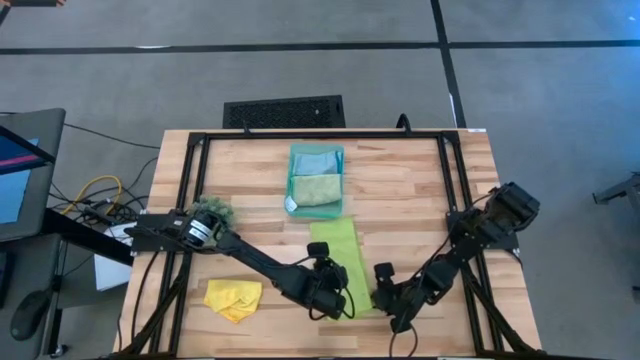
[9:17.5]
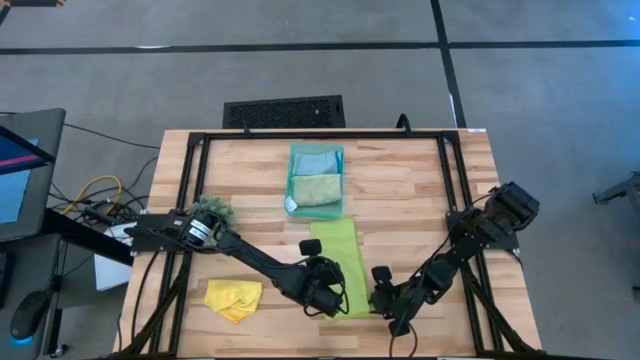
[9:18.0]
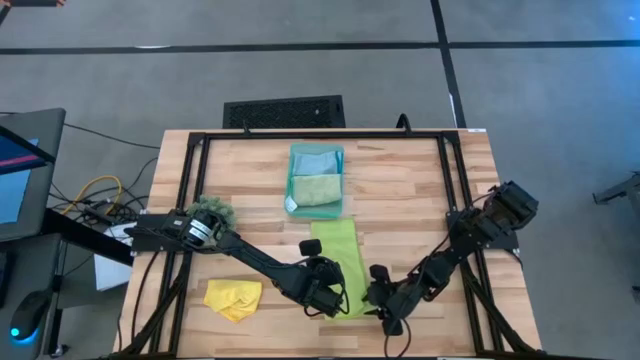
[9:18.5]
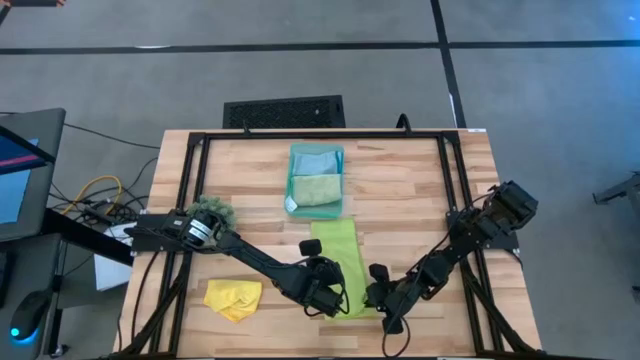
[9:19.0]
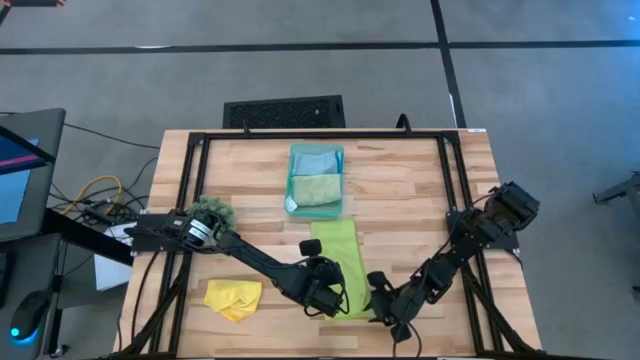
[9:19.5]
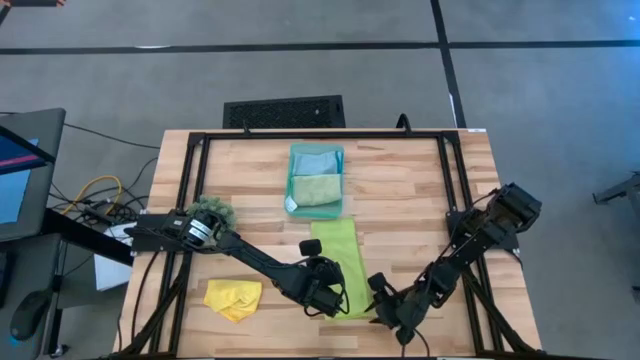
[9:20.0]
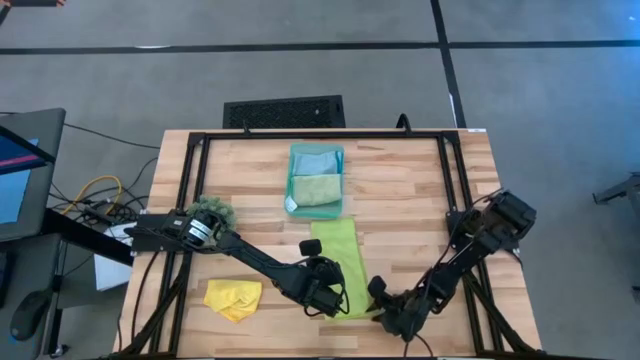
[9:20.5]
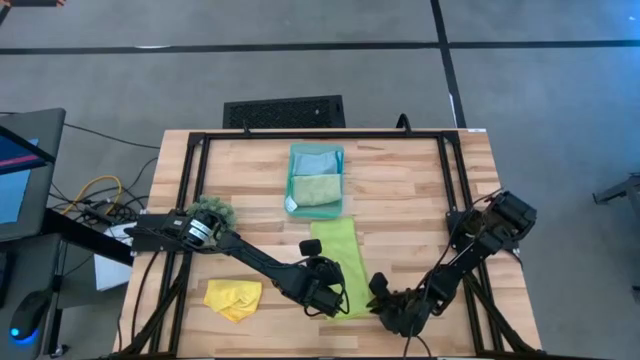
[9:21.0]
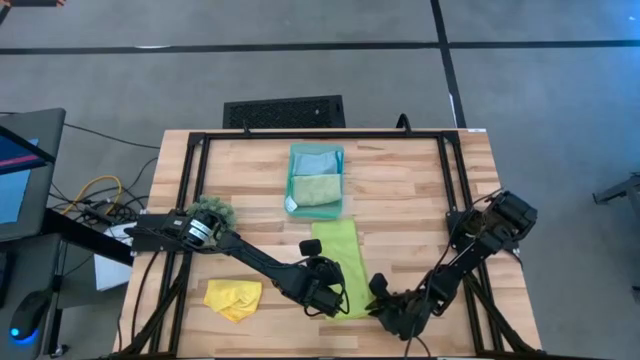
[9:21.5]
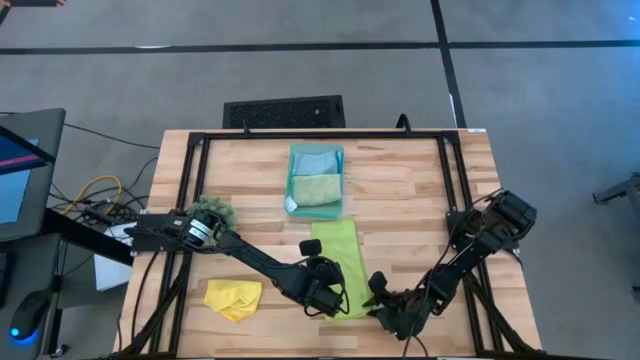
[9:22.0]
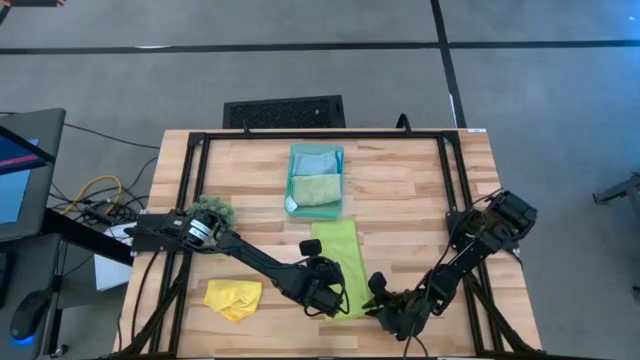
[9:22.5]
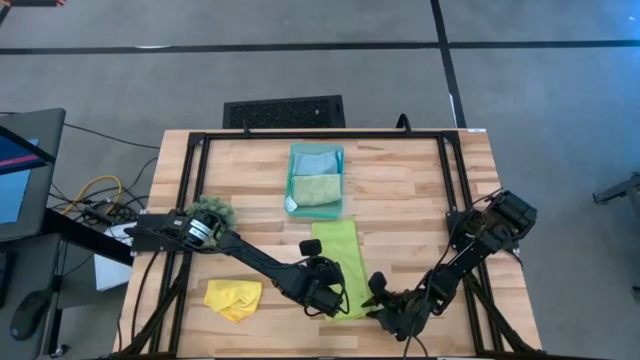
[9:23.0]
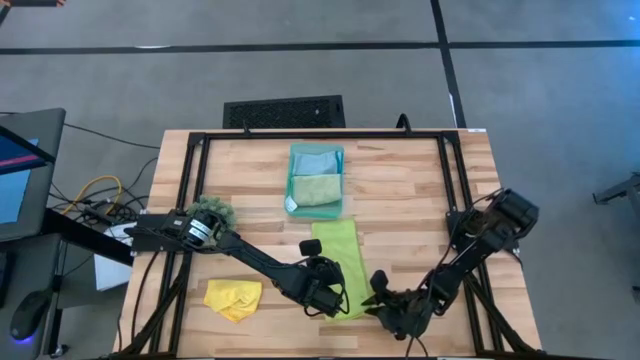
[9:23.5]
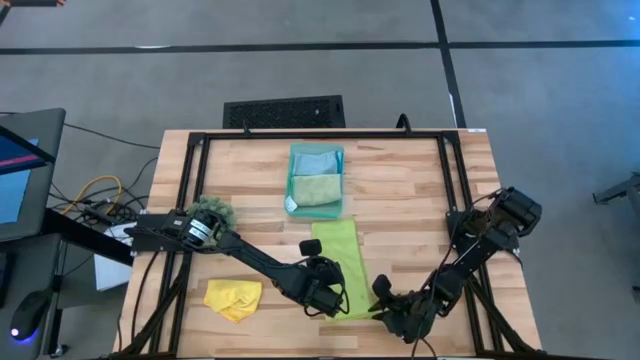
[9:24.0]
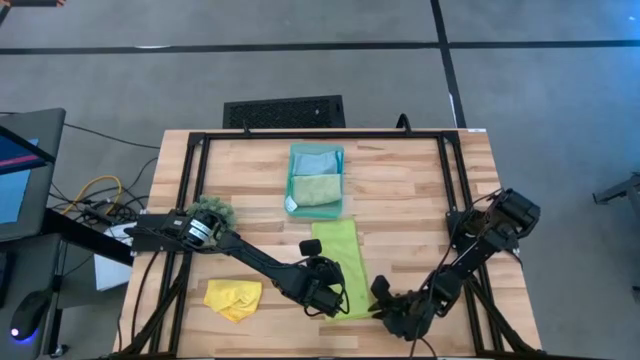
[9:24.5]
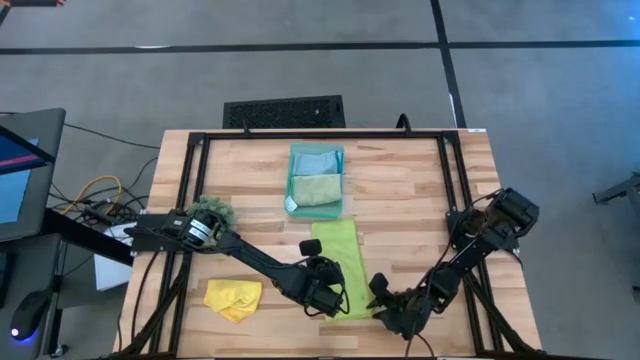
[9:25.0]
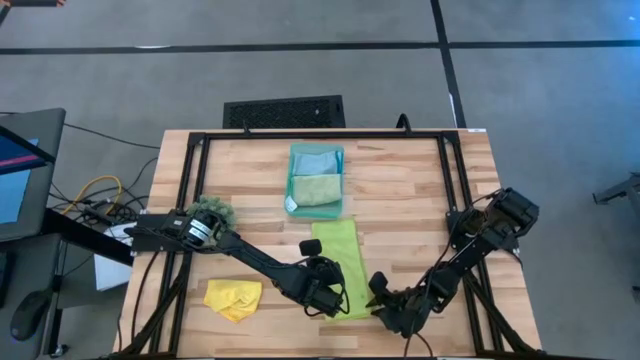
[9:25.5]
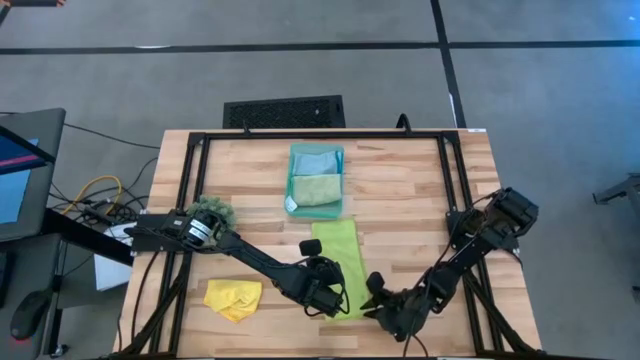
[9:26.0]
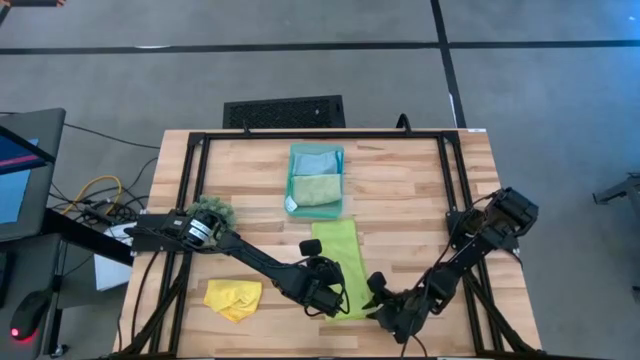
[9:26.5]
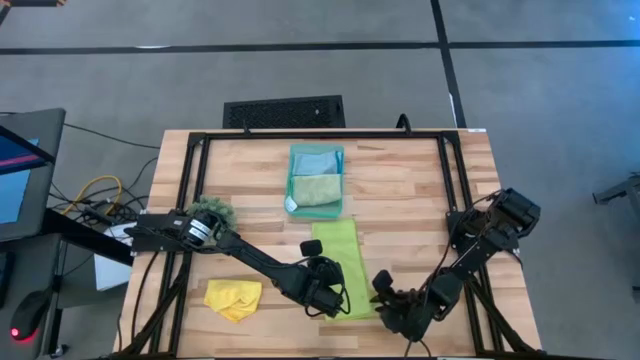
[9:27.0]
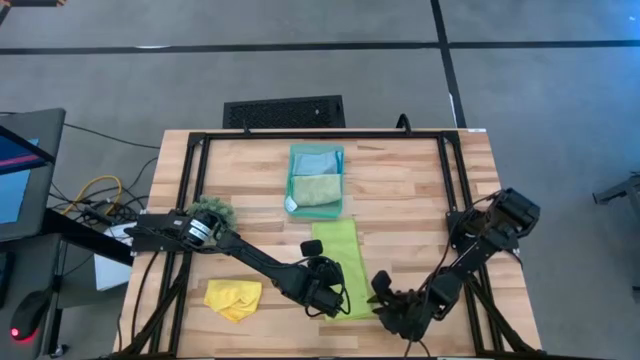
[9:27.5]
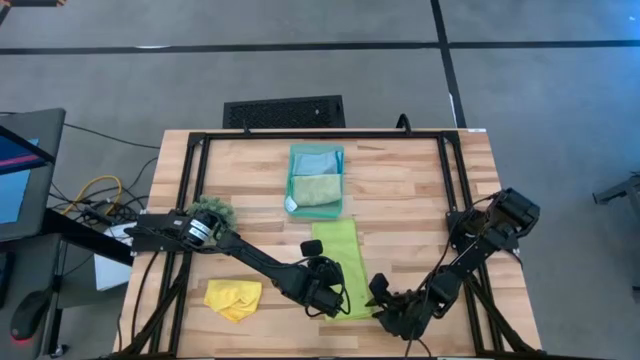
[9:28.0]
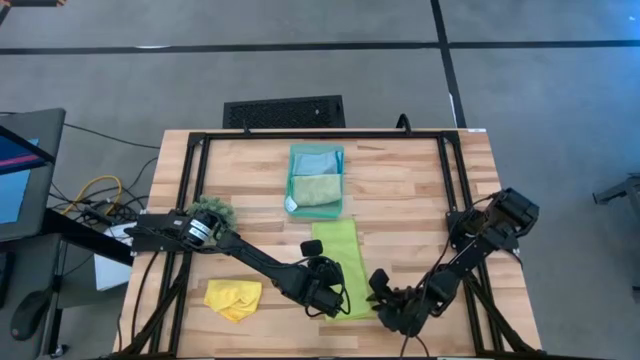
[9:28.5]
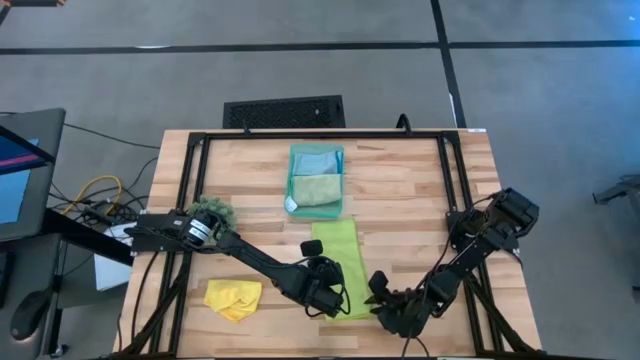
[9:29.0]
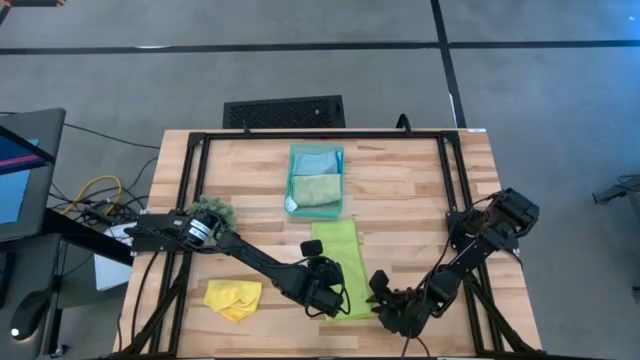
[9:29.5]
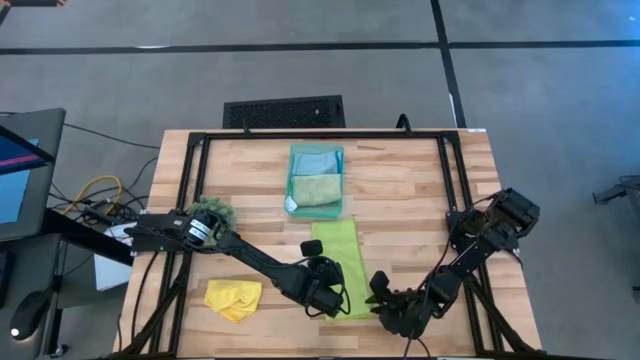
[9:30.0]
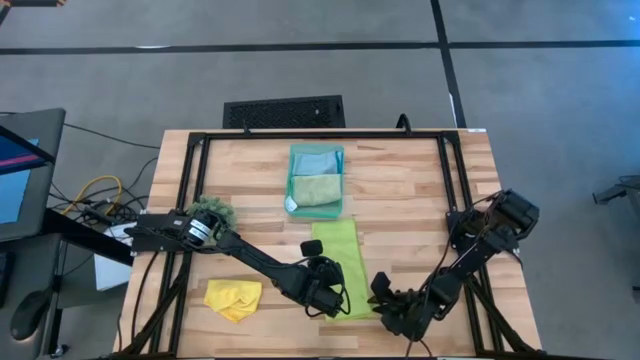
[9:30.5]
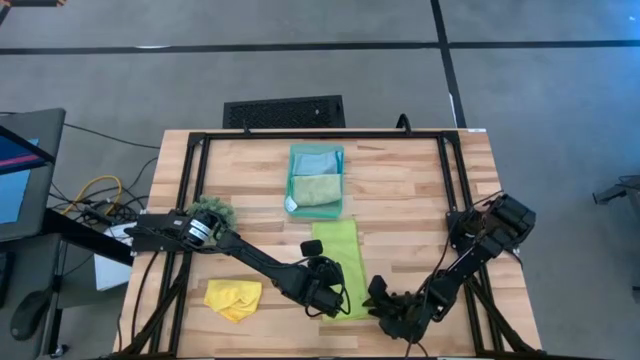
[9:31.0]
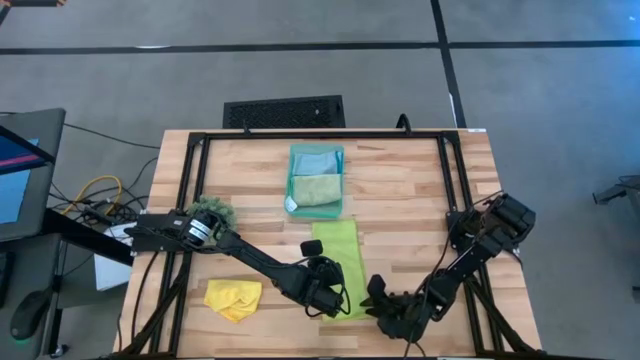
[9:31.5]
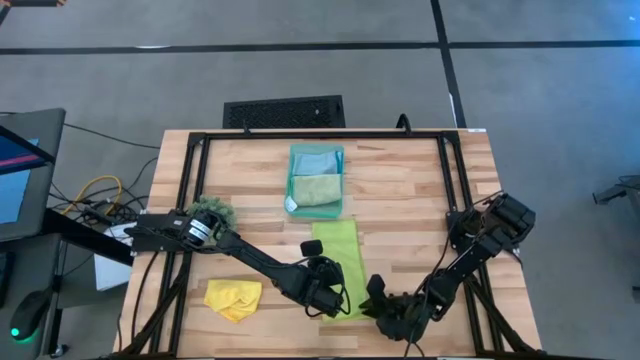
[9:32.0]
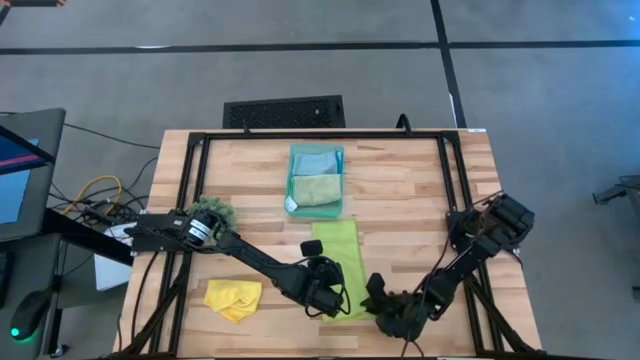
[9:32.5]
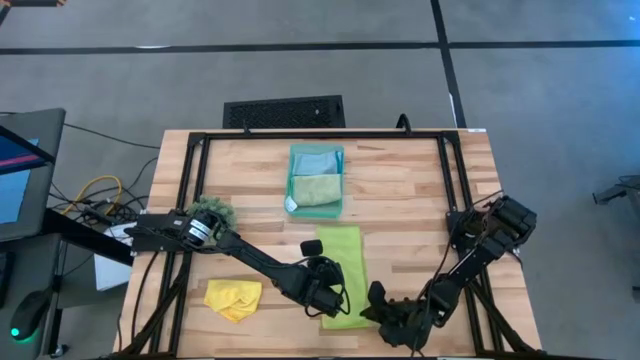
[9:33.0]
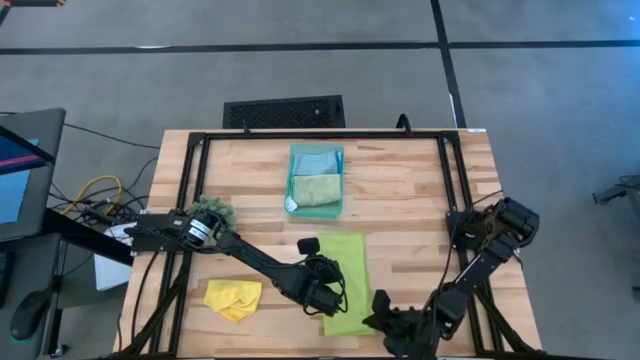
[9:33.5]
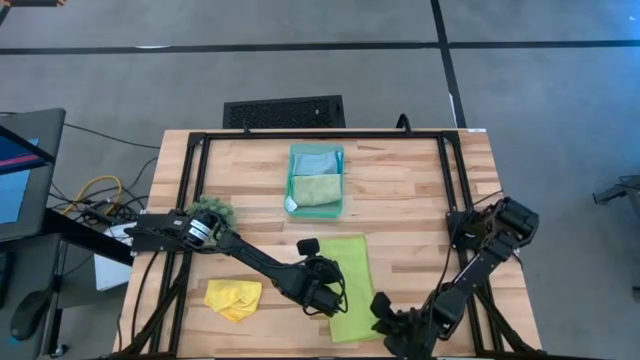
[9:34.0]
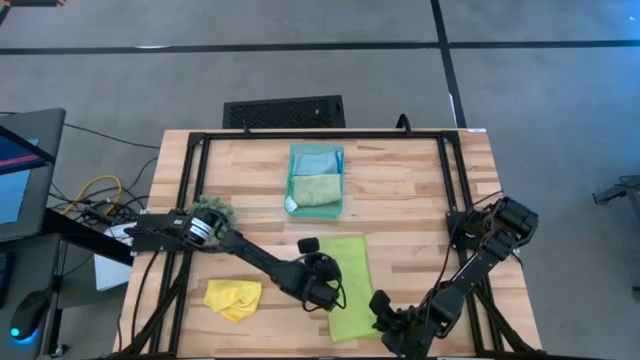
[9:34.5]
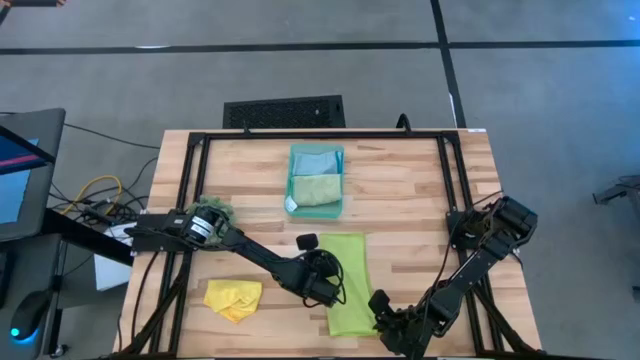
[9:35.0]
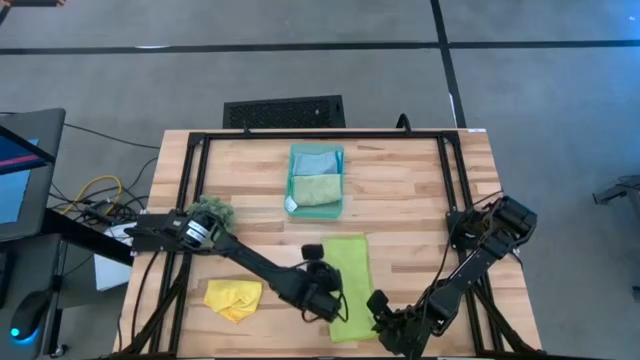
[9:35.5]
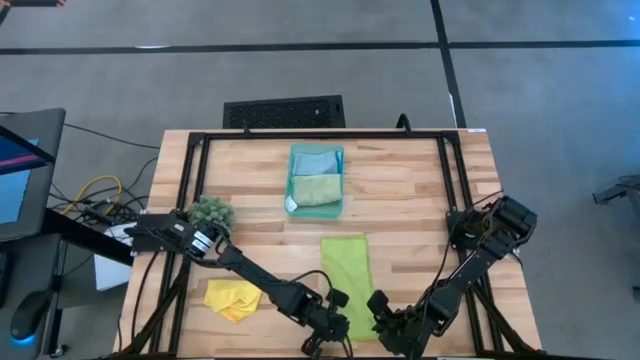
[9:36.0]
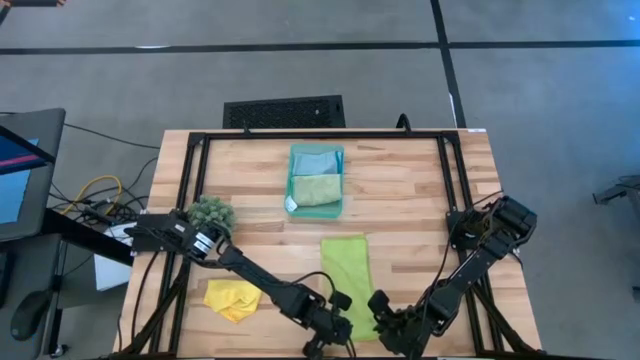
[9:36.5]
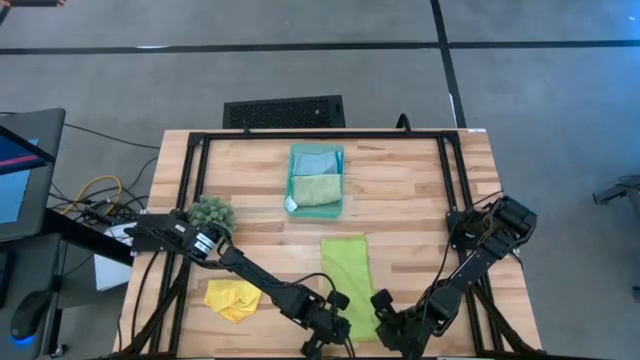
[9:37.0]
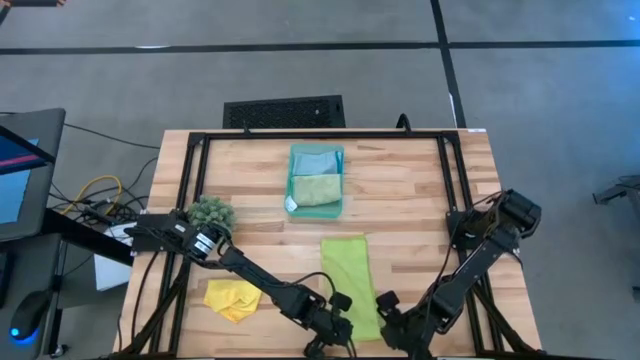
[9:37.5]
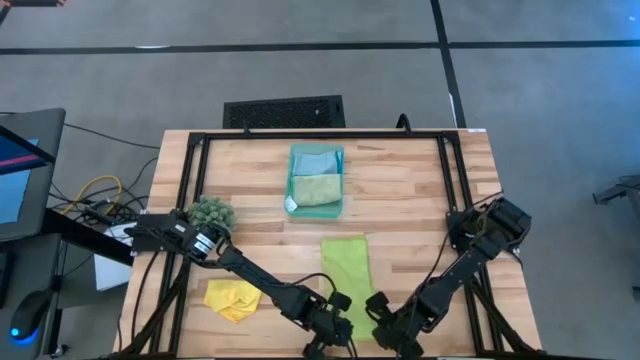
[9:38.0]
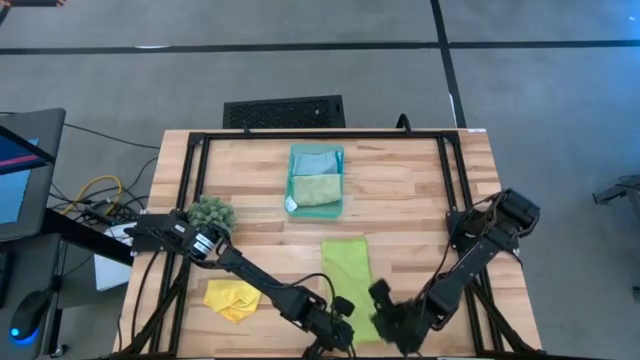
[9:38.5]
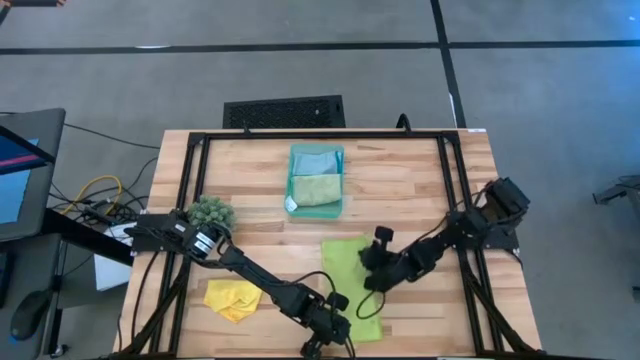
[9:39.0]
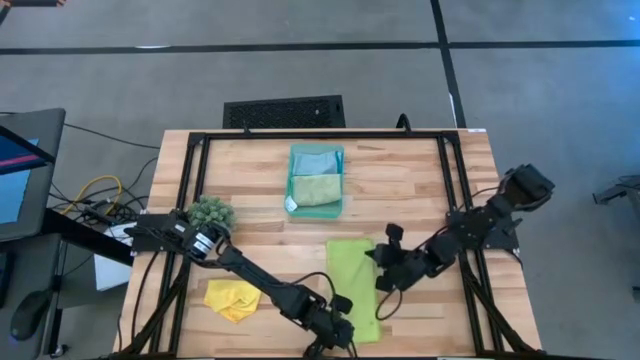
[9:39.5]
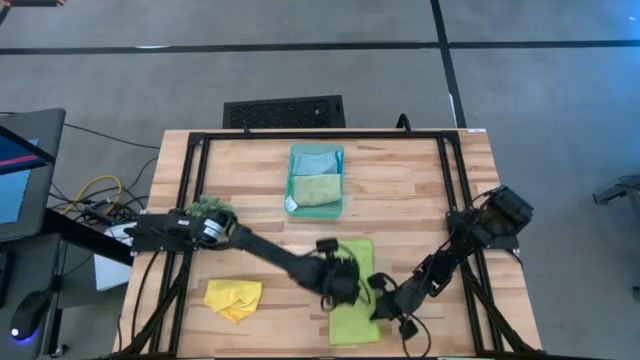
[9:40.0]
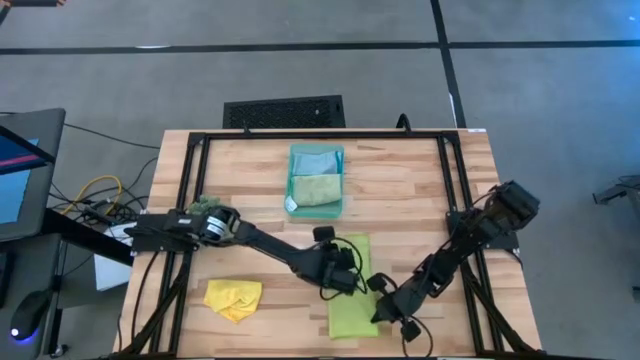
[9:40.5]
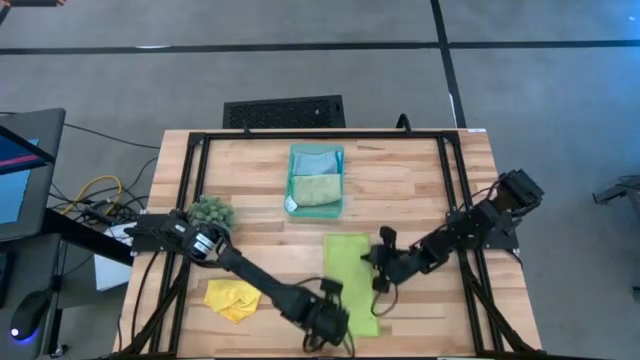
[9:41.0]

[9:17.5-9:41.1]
Task: Fold microfiber towels
Fold the light green microfiber cloth
